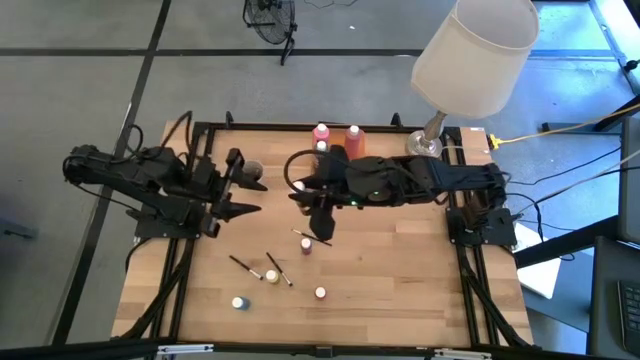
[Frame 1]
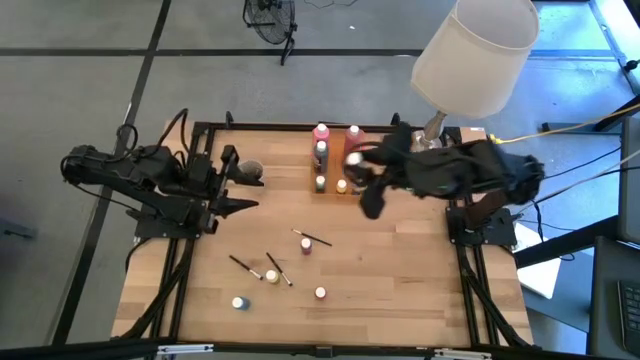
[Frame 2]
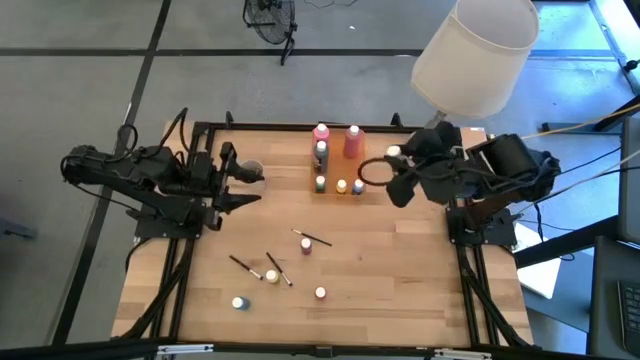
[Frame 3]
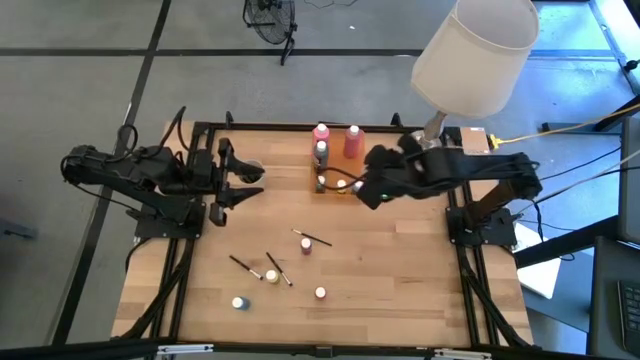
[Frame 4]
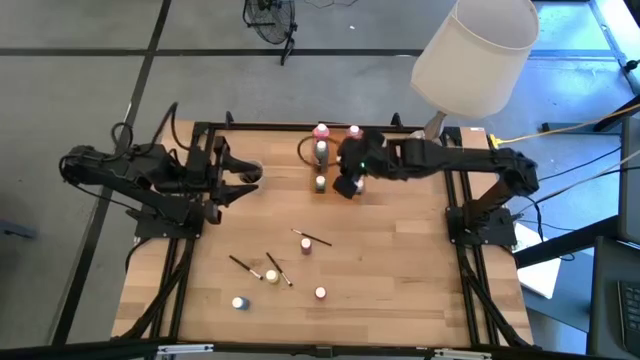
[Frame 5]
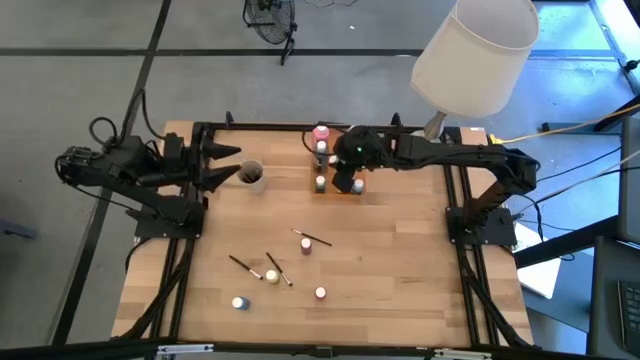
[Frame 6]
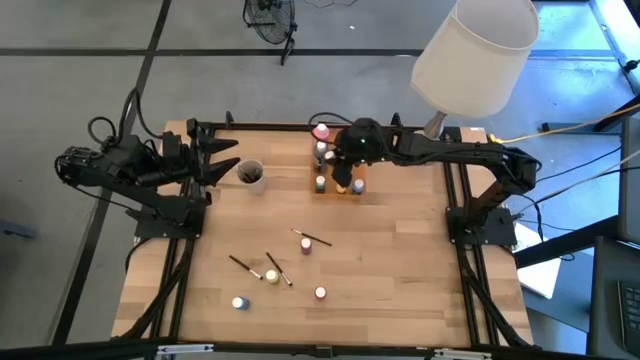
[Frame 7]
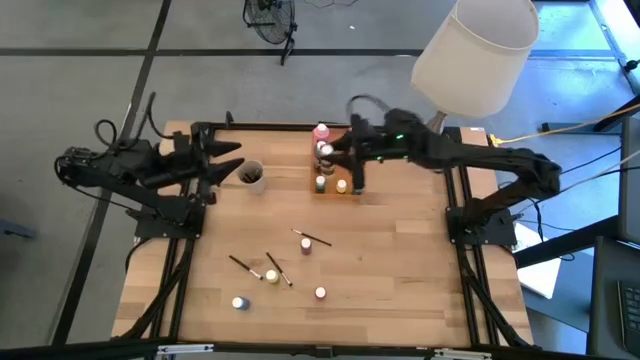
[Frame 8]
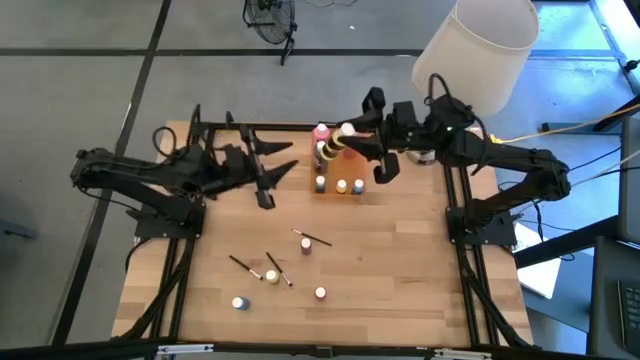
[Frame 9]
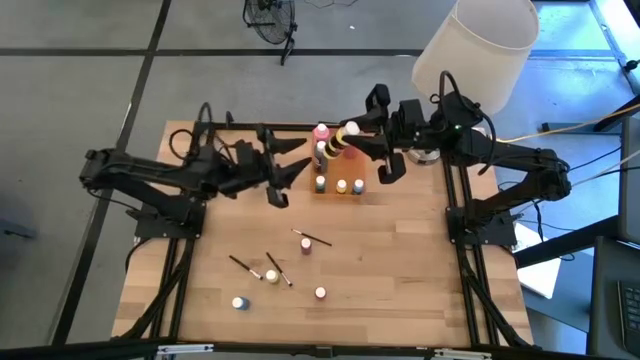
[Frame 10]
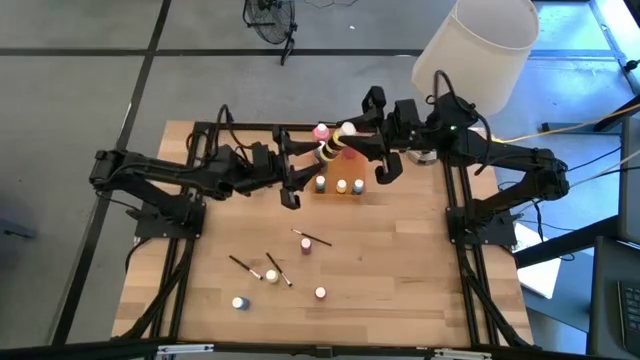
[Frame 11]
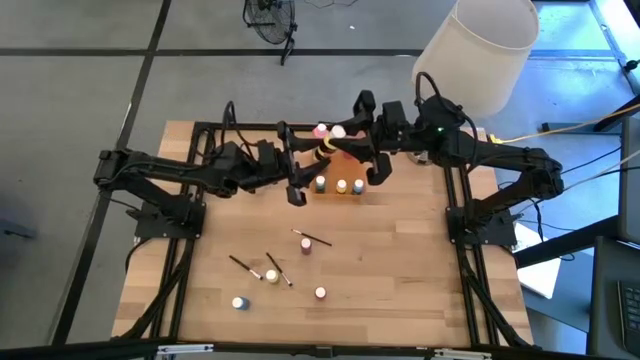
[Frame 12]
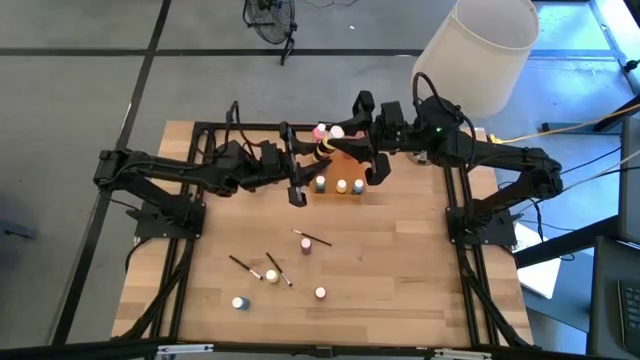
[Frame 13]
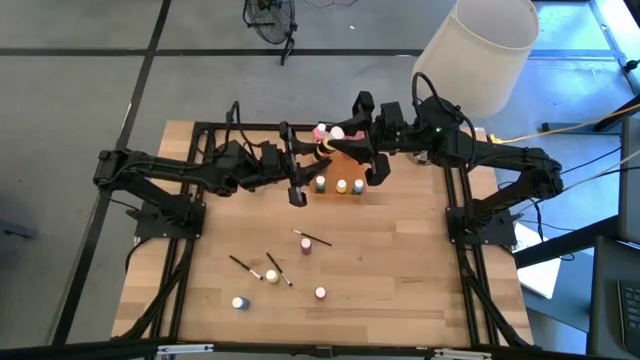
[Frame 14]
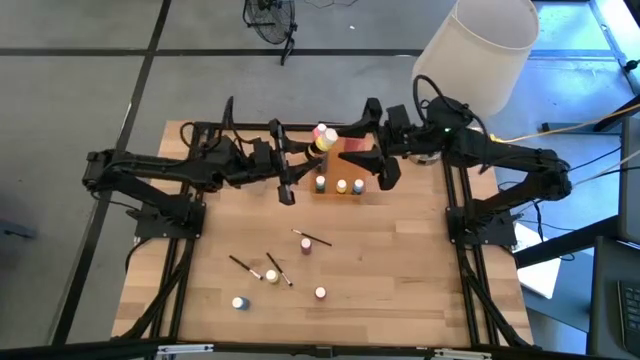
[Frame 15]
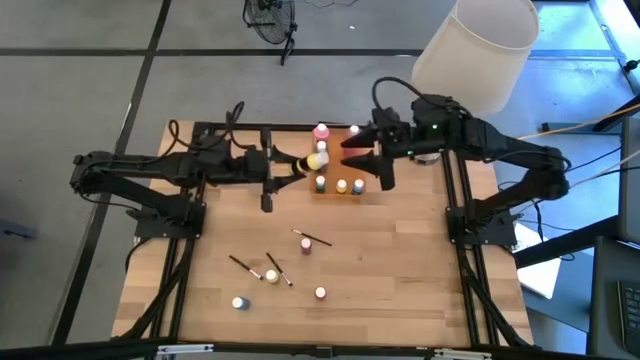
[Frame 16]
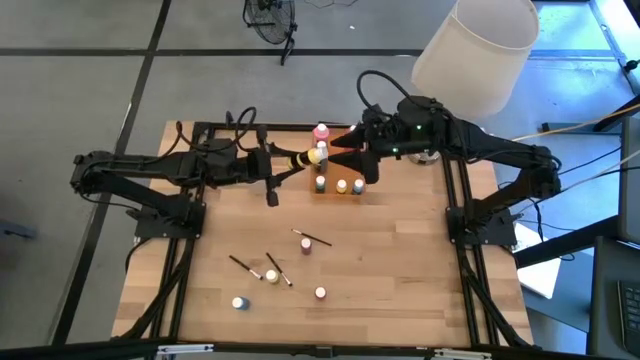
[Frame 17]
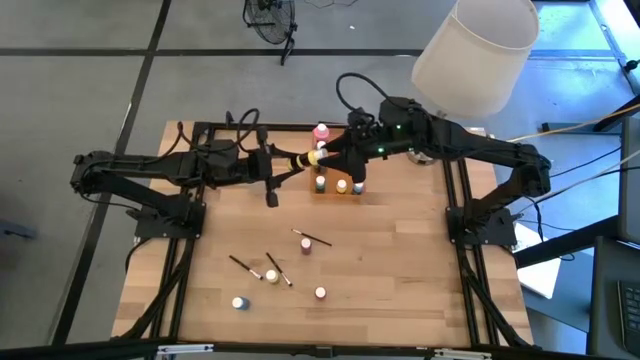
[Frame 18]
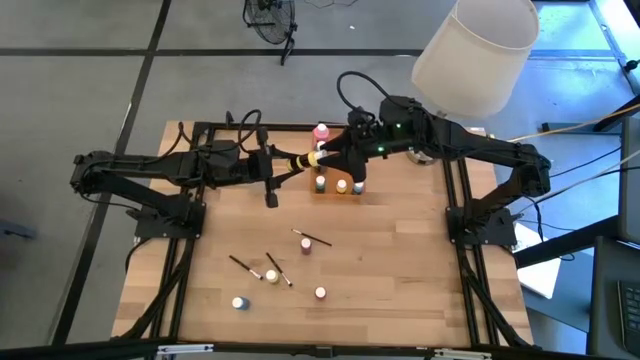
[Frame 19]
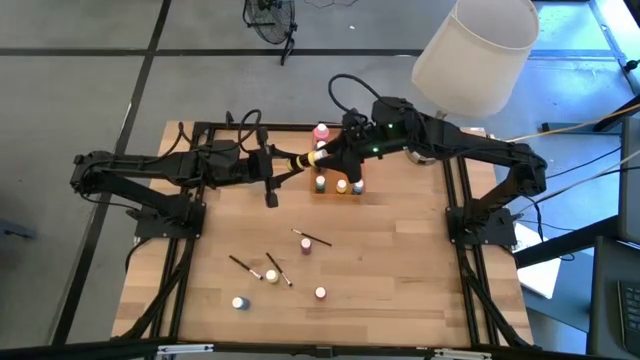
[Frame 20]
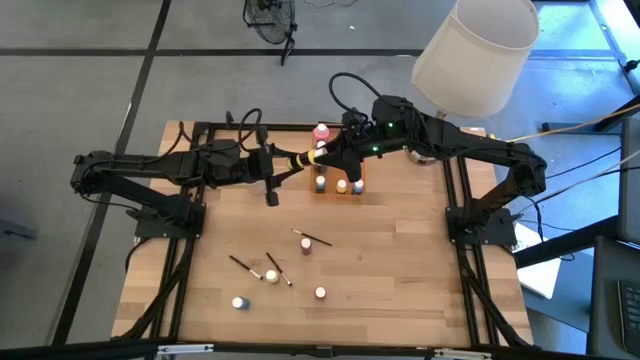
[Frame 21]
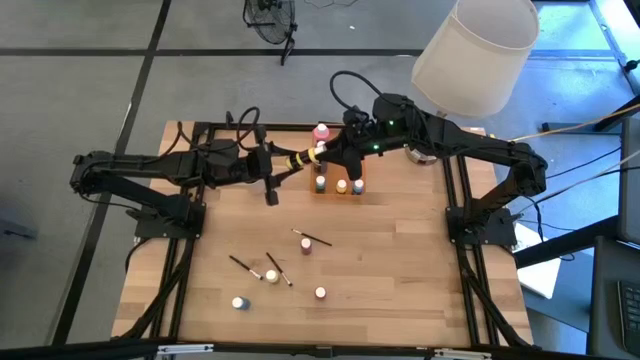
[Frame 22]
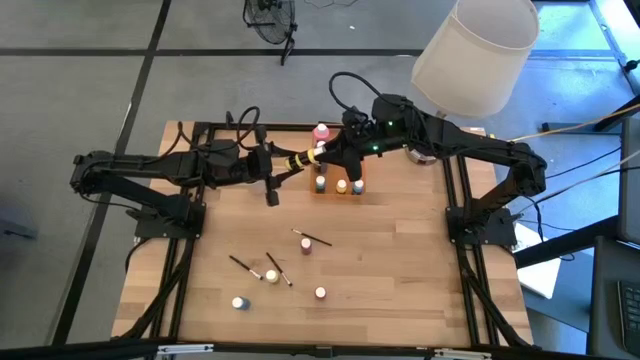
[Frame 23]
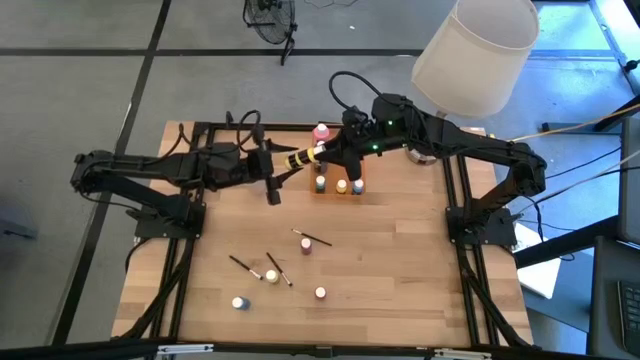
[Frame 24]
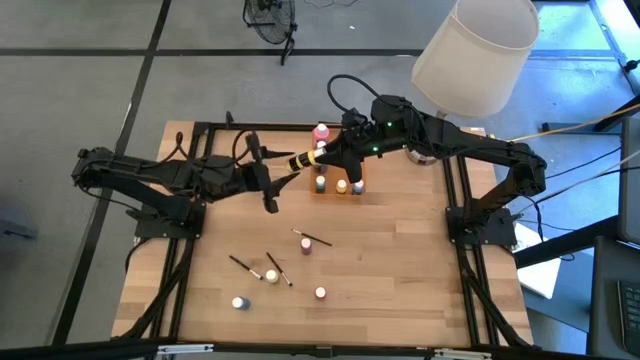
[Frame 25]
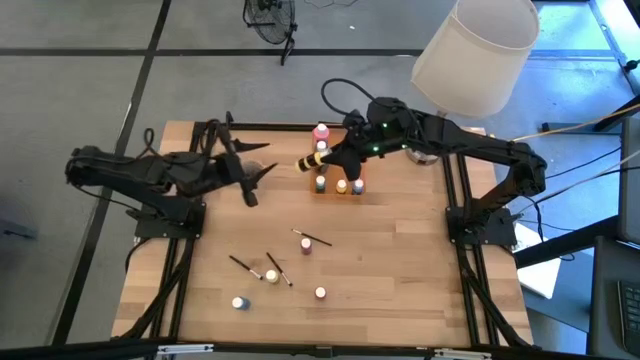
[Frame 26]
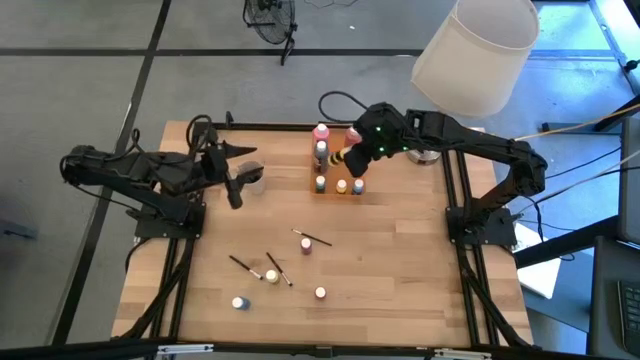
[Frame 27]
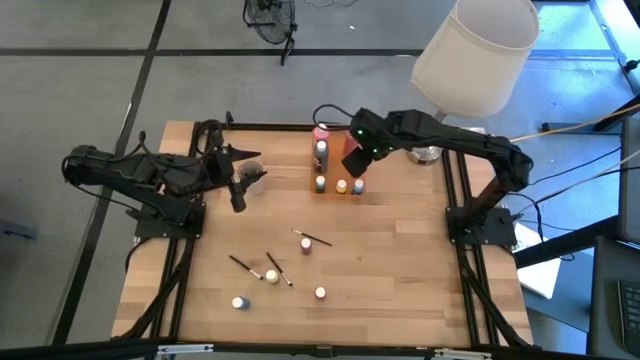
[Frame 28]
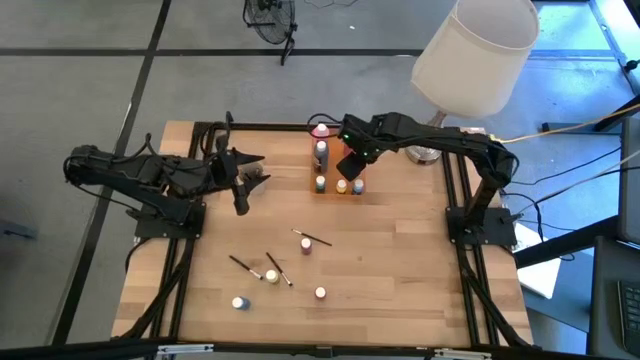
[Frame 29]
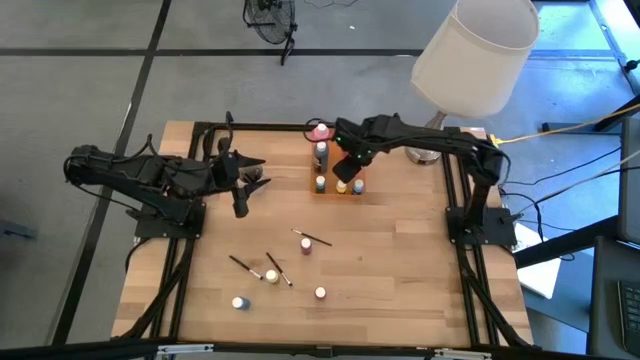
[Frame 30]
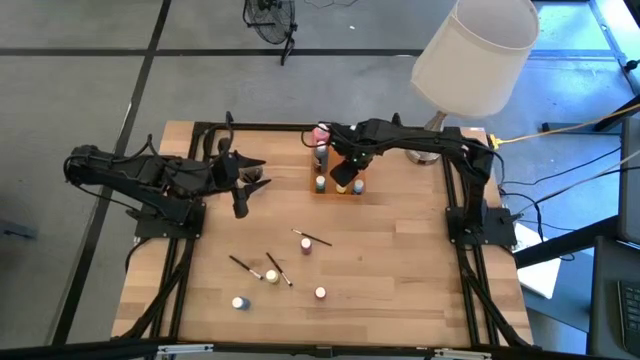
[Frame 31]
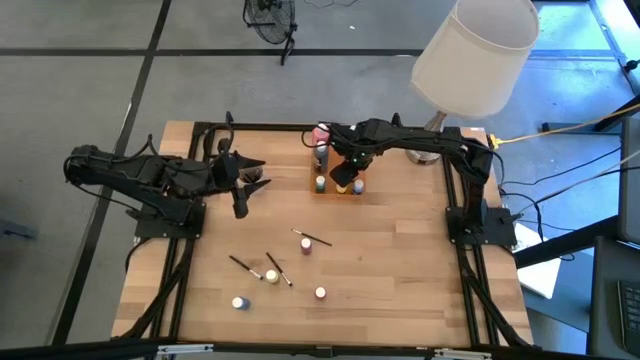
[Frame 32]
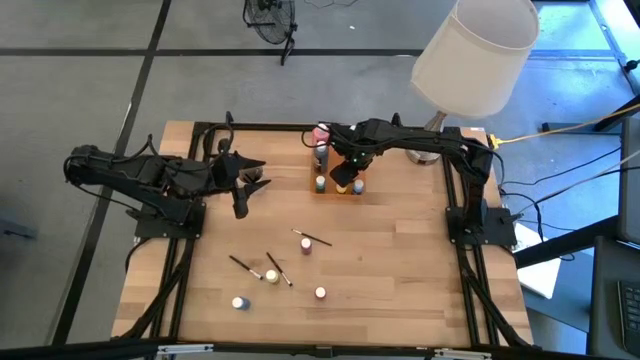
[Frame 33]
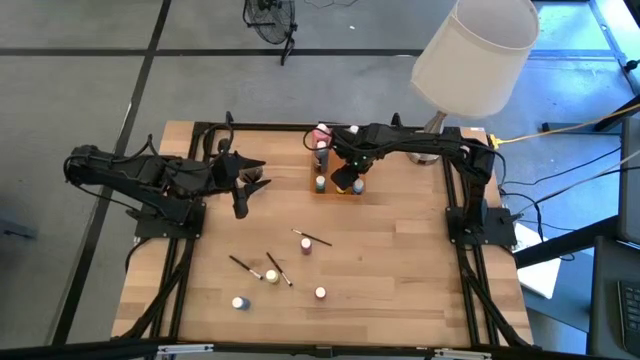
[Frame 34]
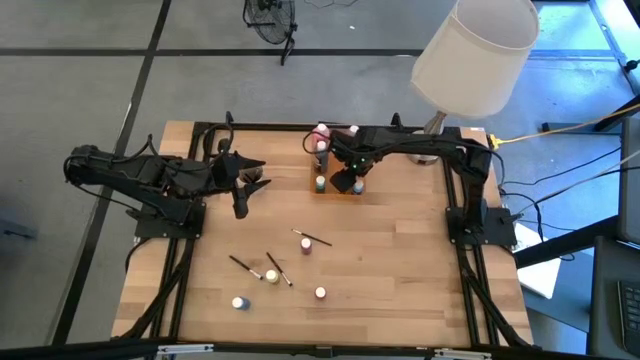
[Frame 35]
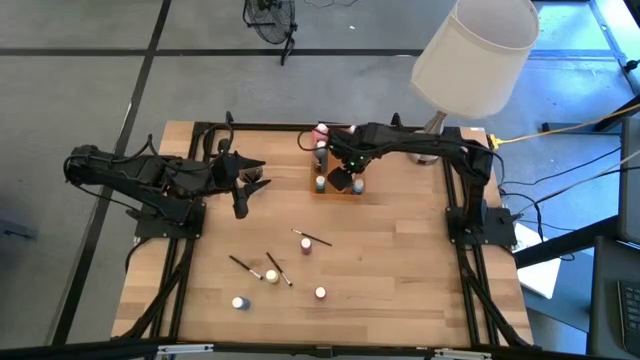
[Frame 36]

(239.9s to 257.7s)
Task: Pick & Place Paint Supplies
Put the top small light yellow paint bottle into the orange bin

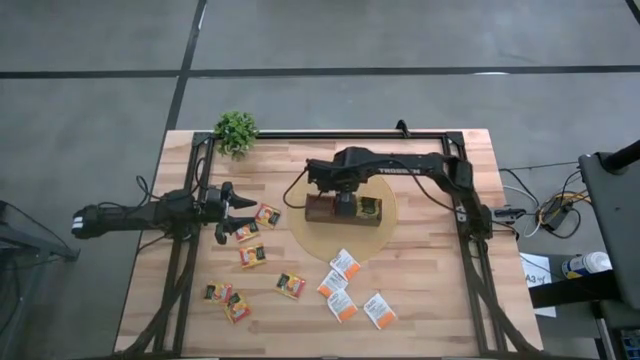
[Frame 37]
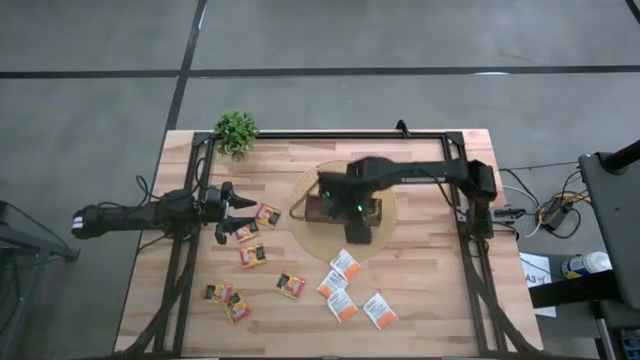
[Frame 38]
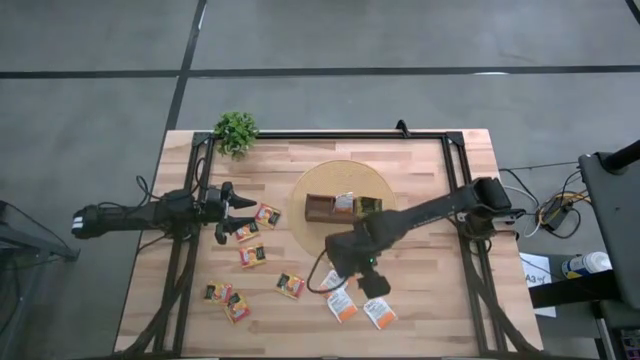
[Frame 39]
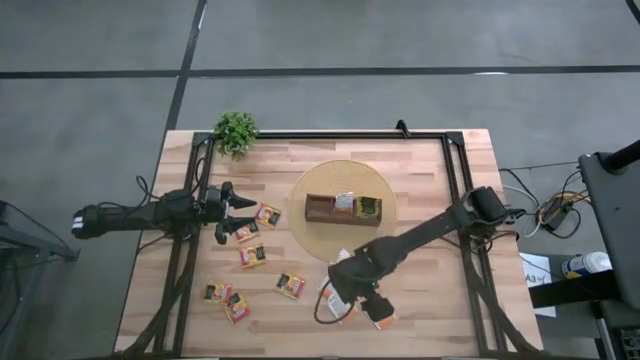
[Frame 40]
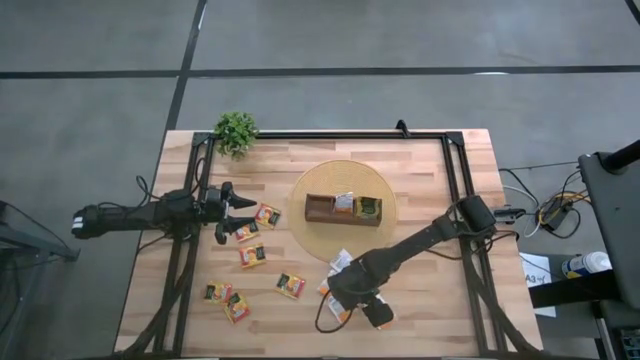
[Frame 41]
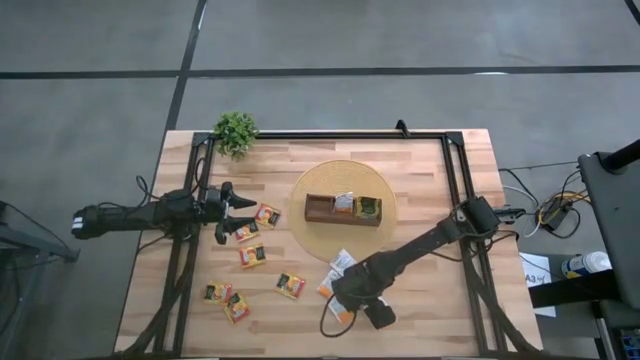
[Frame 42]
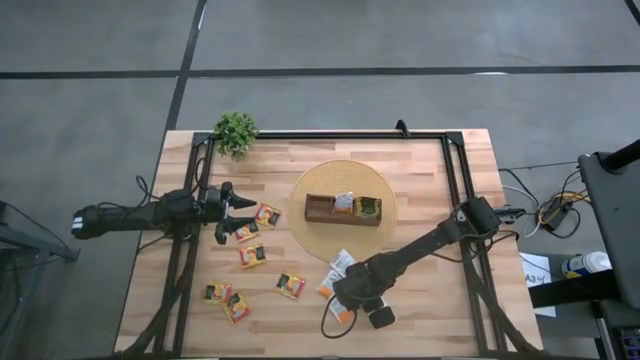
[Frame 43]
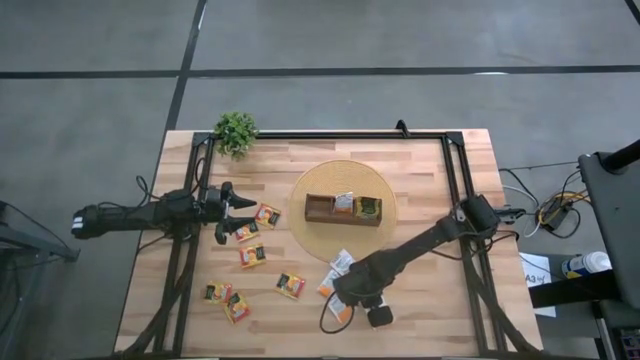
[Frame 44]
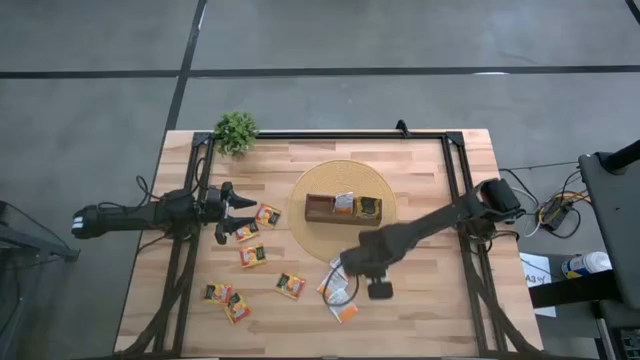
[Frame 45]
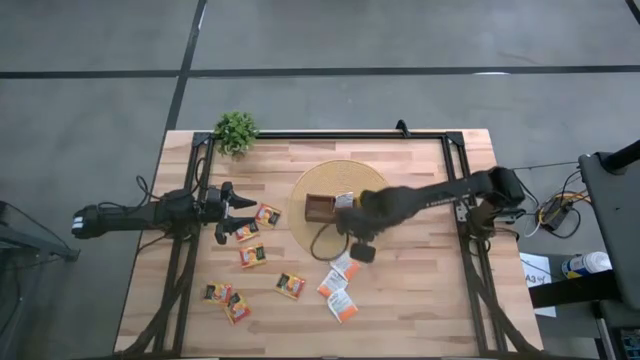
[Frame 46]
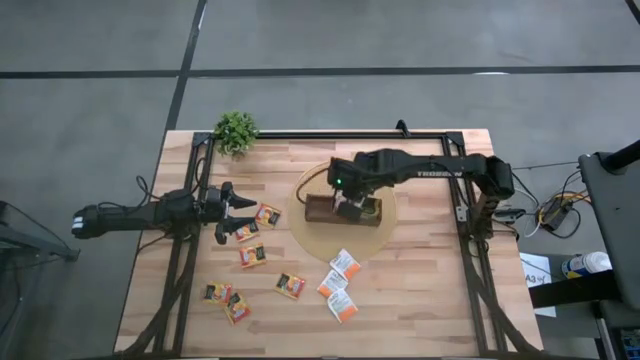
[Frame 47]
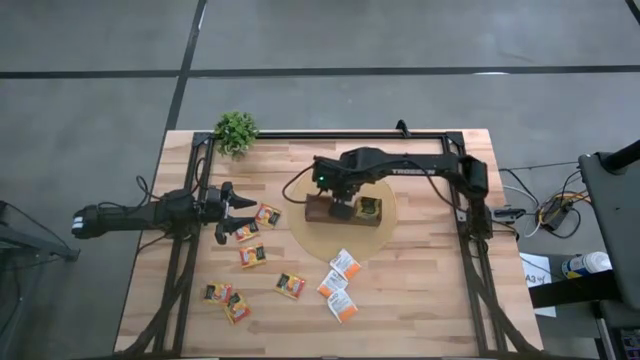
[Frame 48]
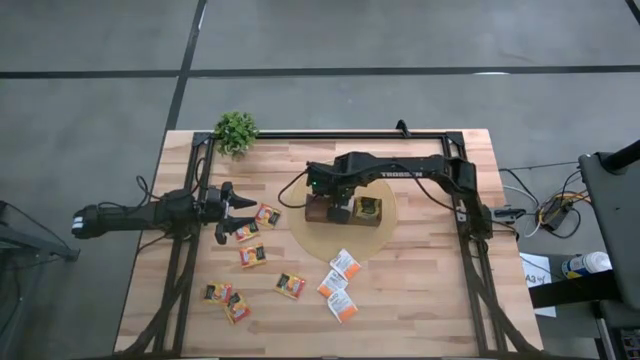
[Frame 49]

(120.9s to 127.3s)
Task: Pick & Place Tea
Put the white tea bag into the middle section of the wooden organizer
